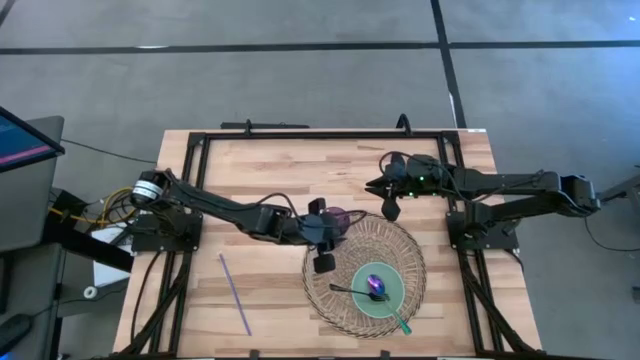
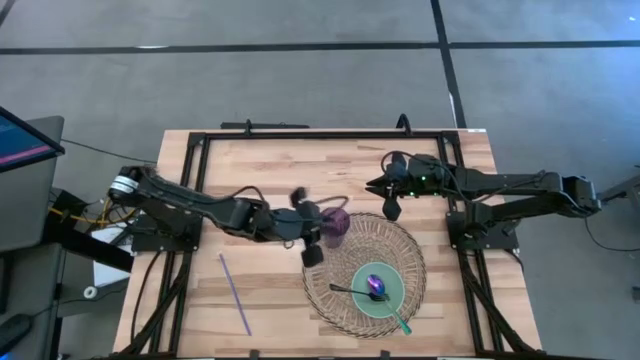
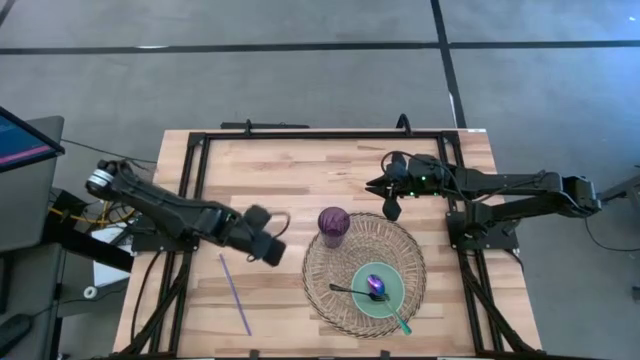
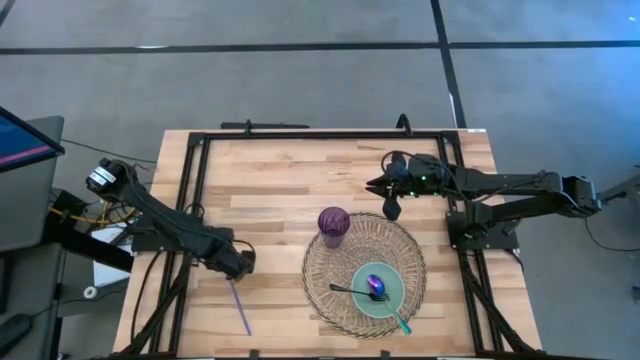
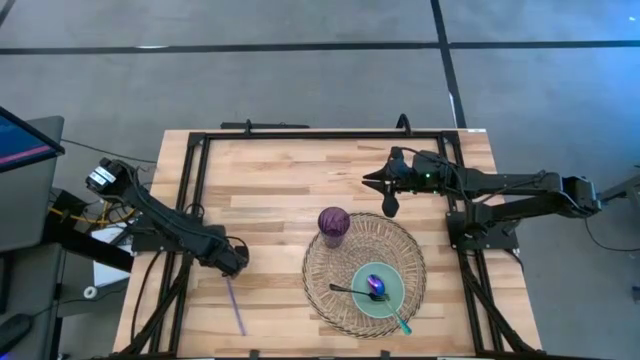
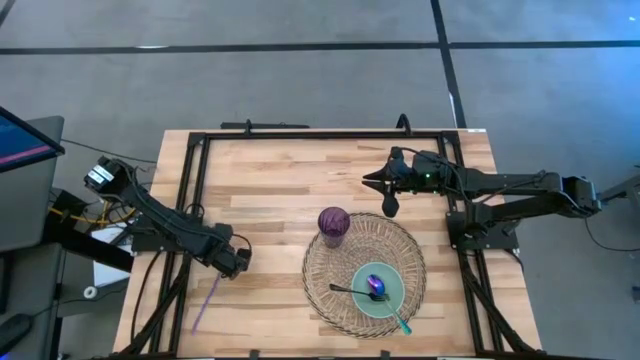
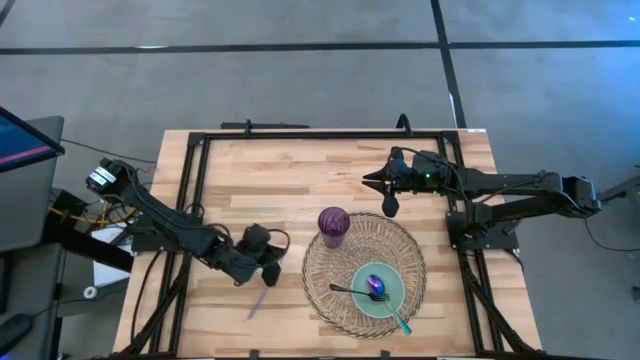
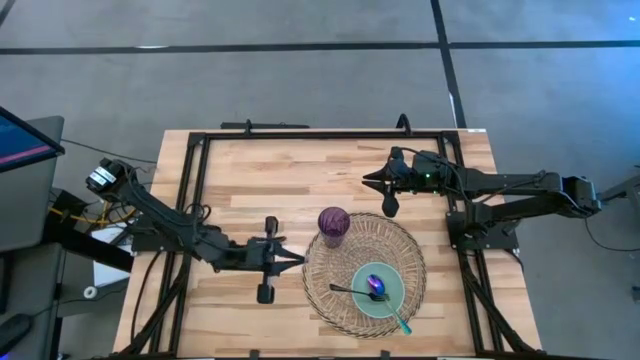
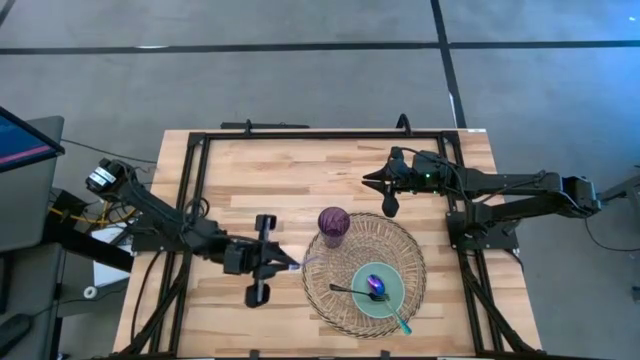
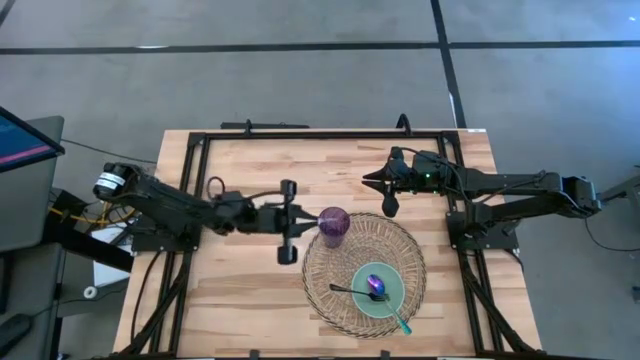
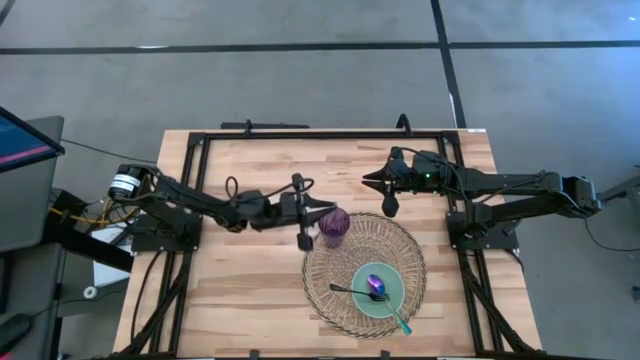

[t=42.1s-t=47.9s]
Task: Pick & Place Utensil
Put the blue straw into the violet cup on the brown mat

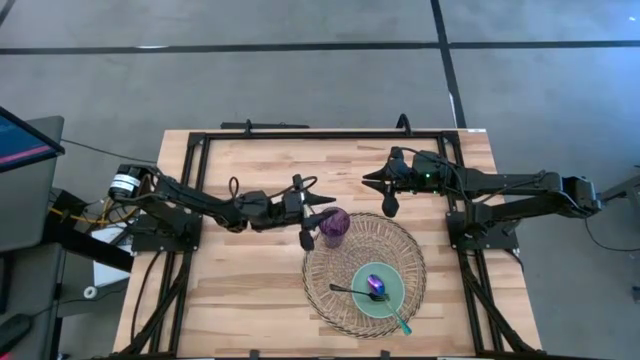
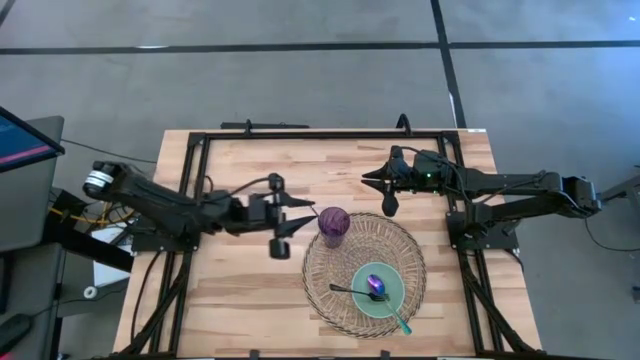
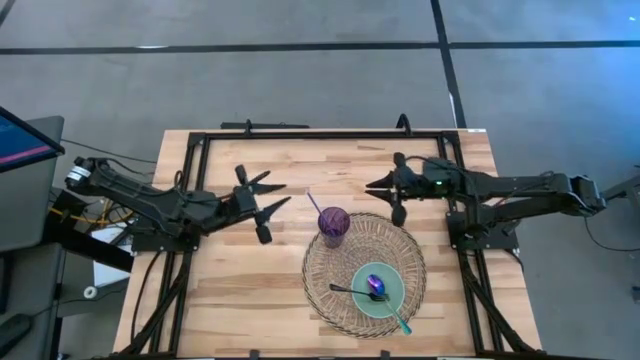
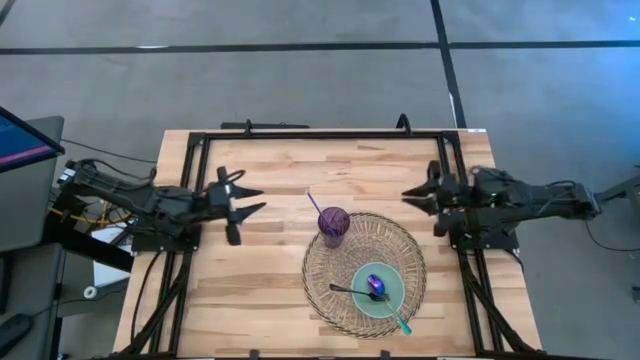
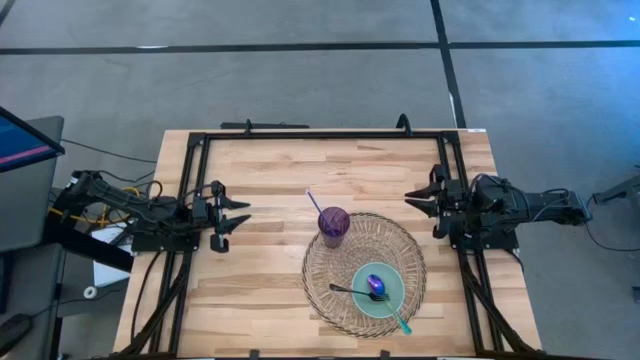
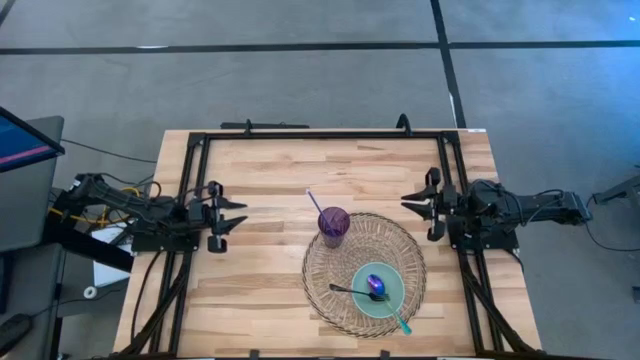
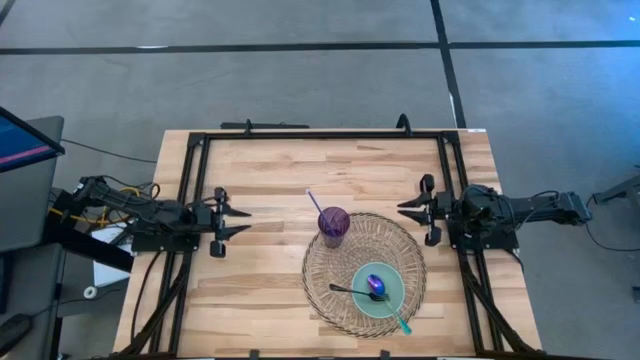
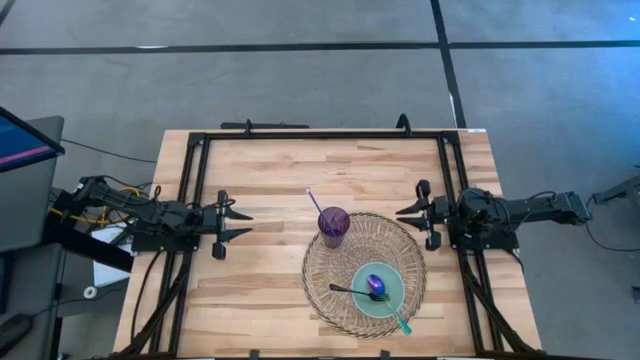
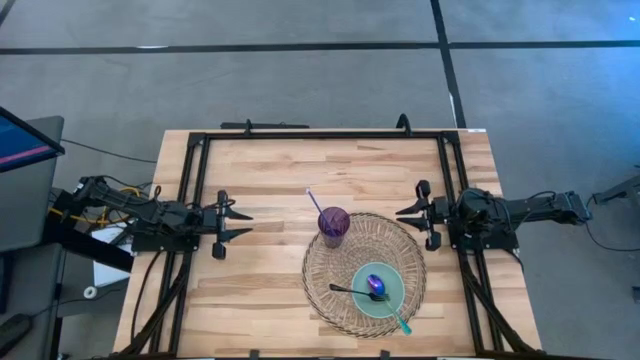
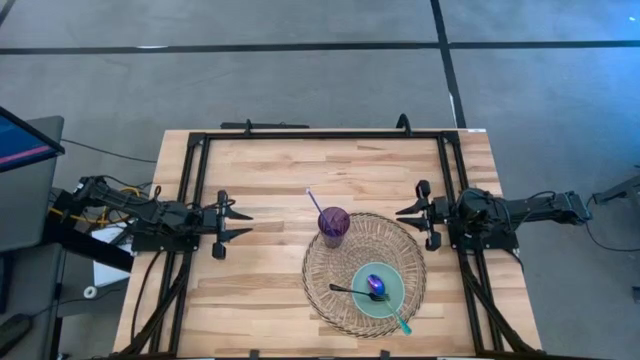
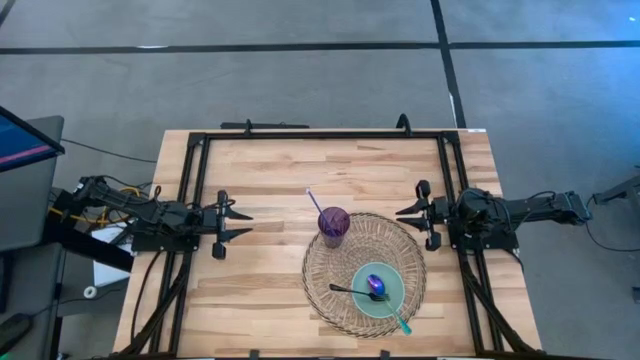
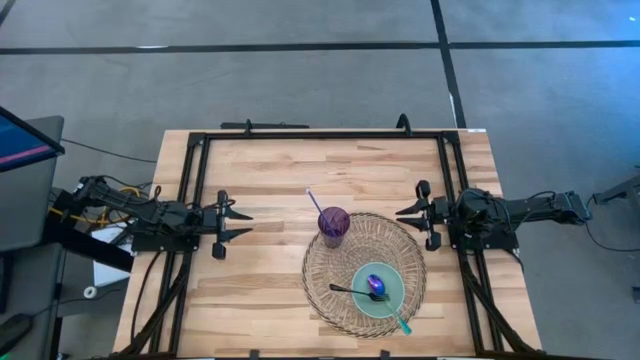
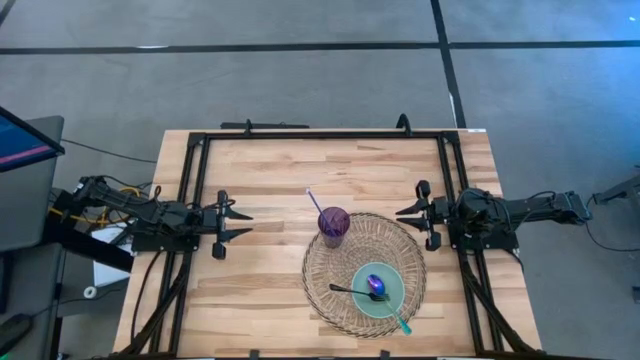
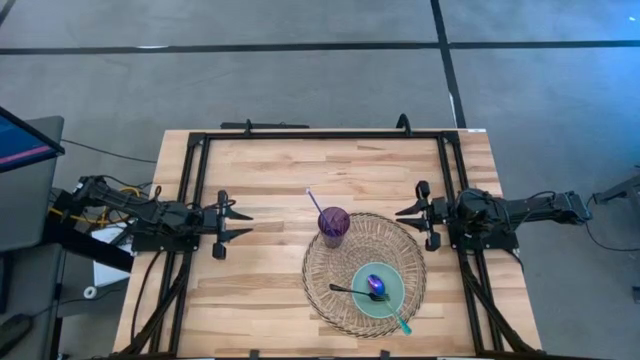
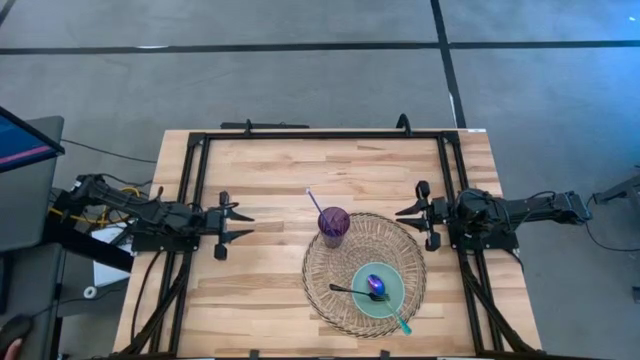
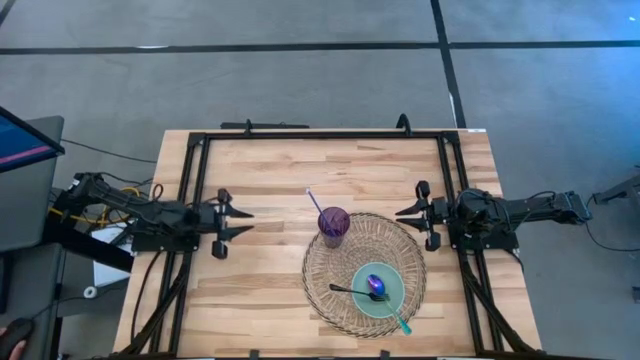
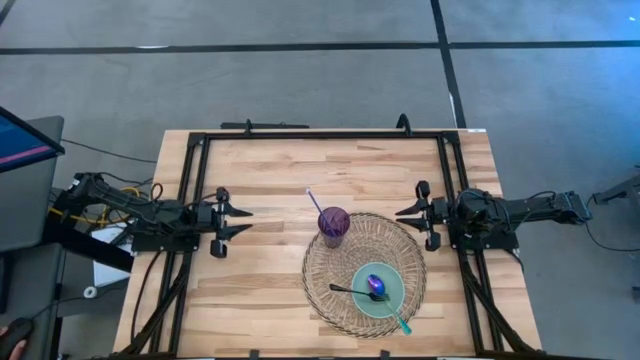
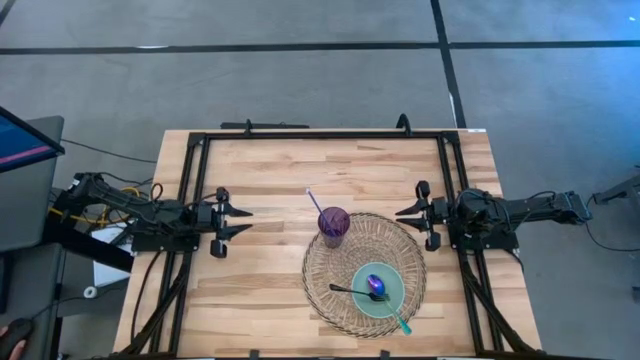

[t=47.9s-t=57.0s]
Return to Home Position

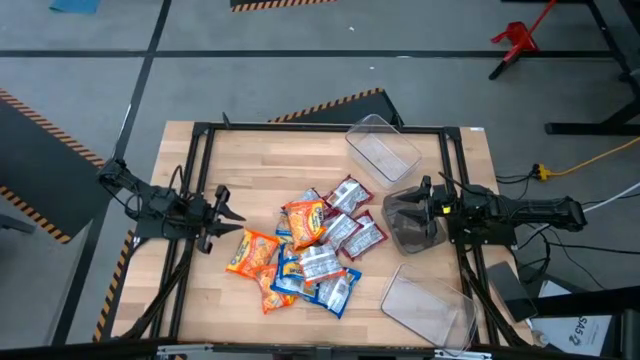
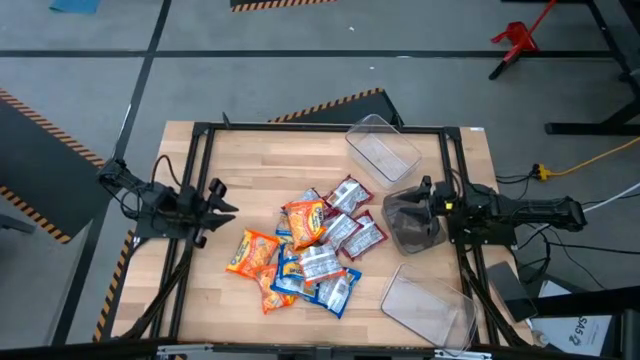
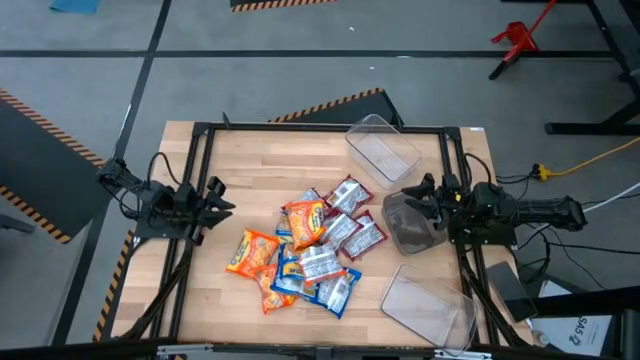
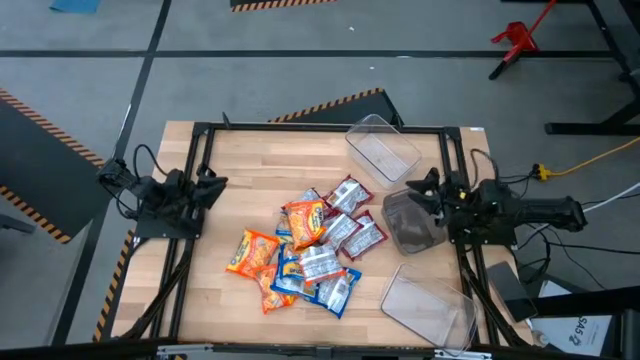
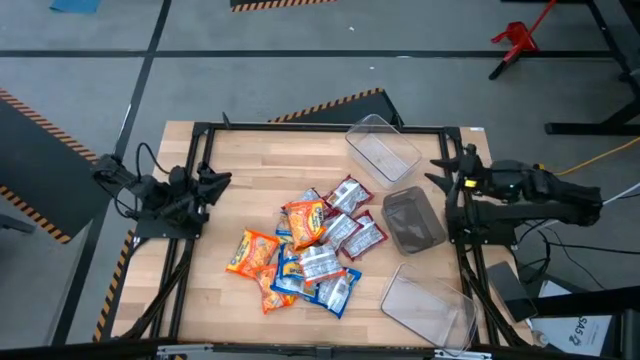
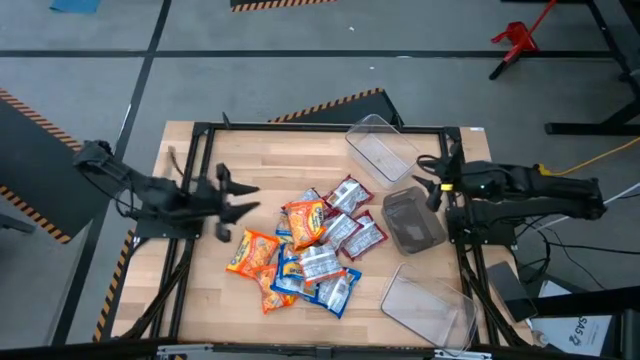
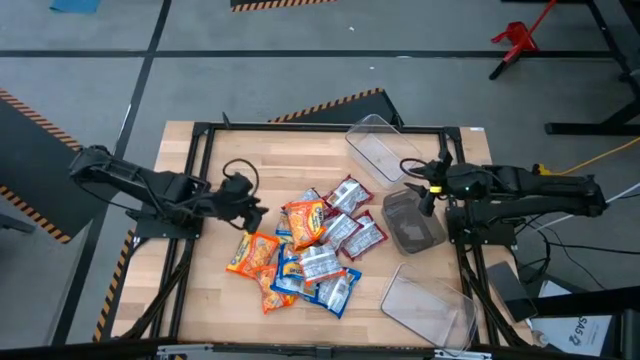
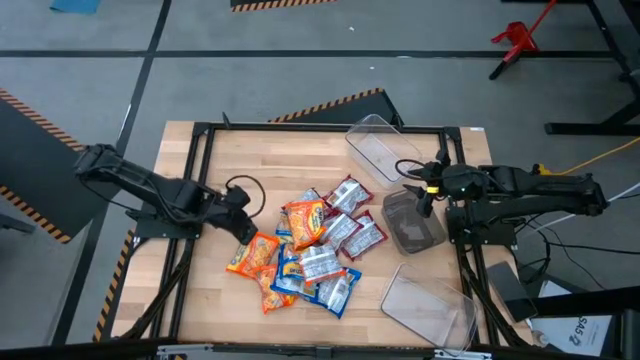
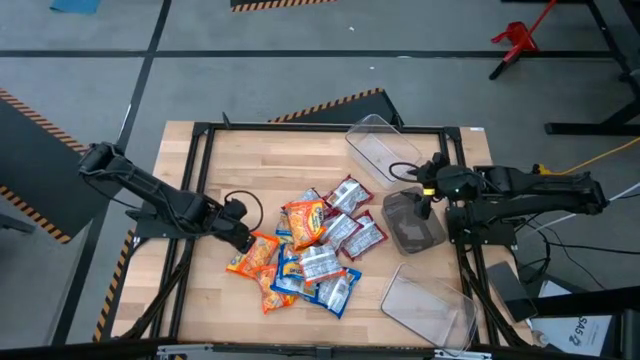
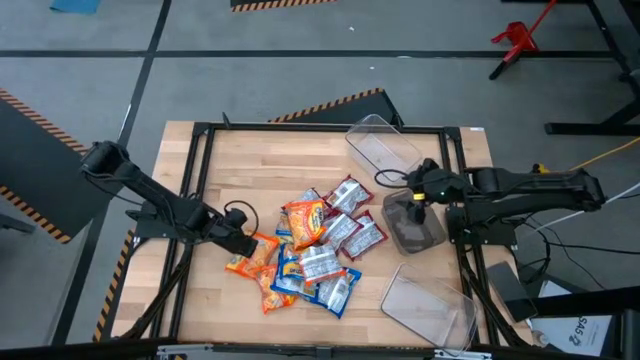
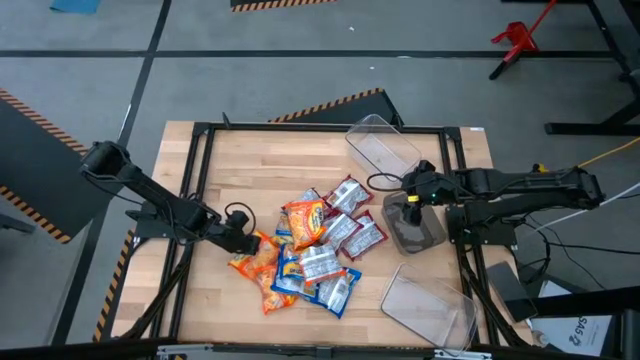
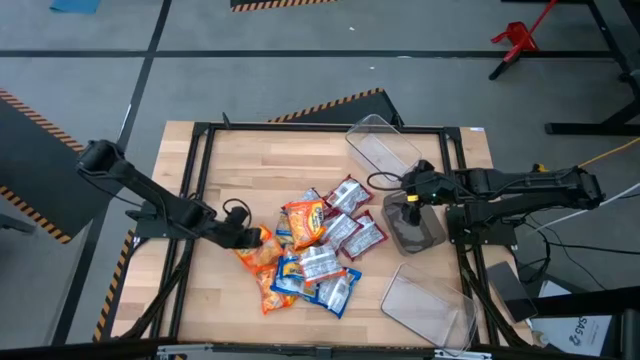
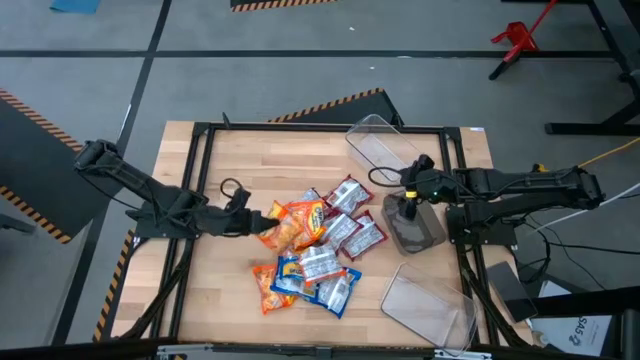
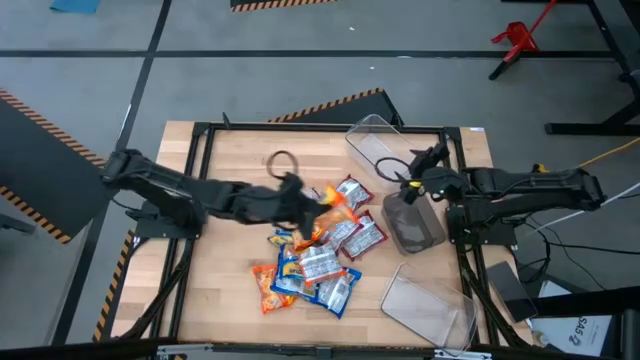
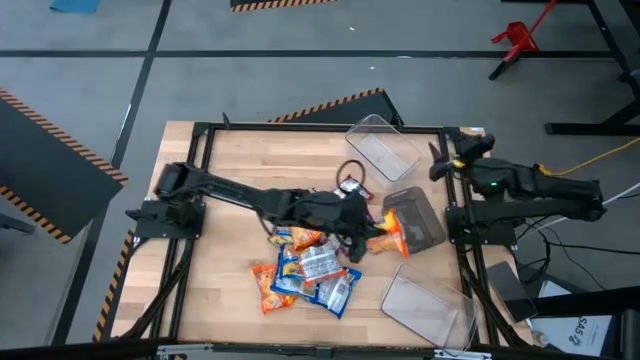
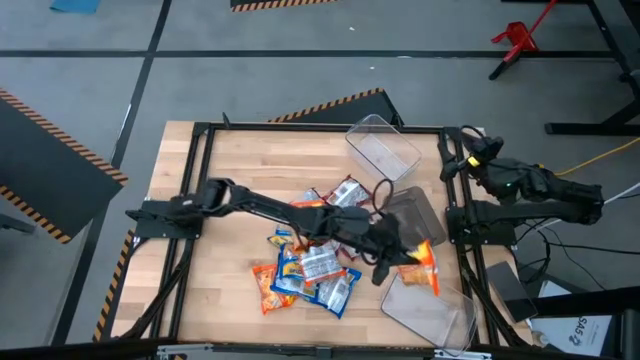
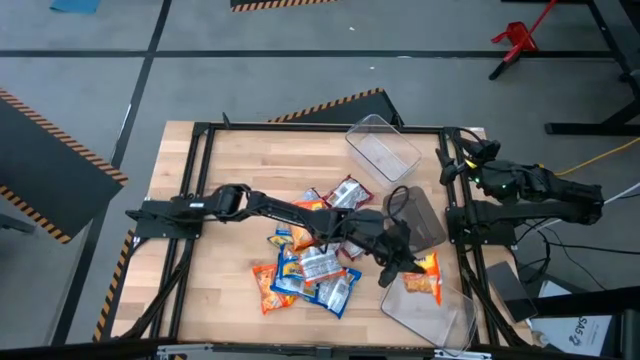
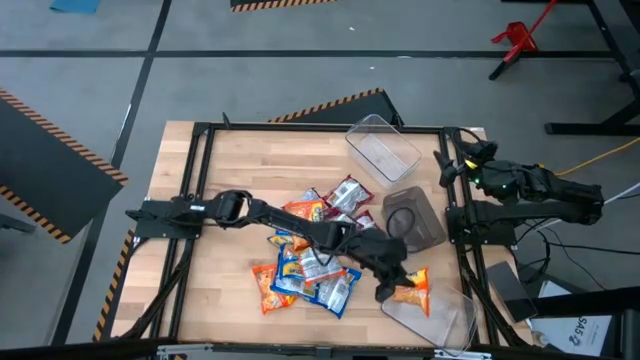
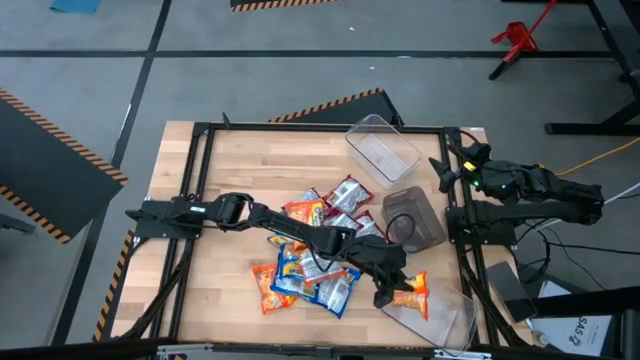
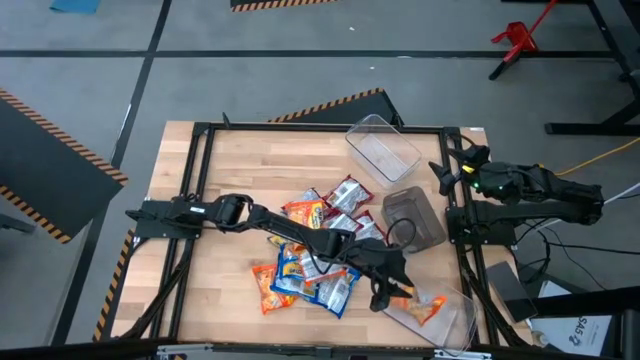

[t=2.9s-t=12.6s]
Task: Sort Maruchan noodles
Put the orange bag into the bottom transparent bin
